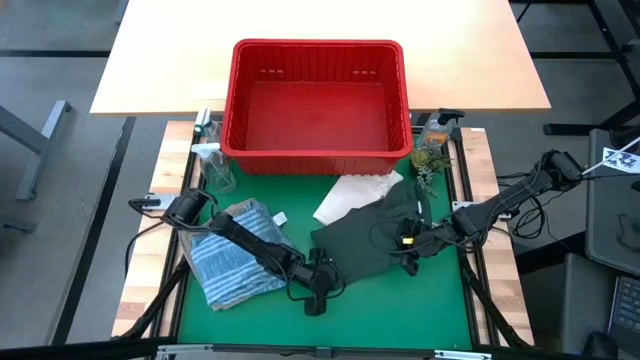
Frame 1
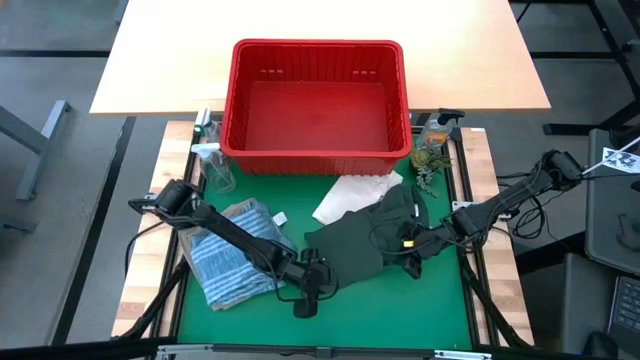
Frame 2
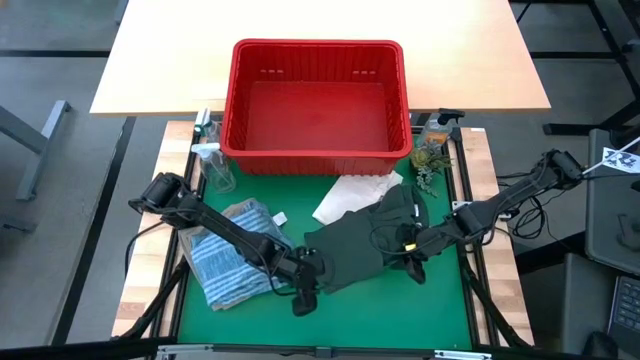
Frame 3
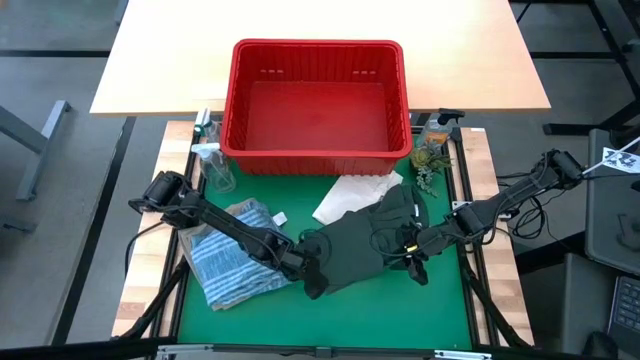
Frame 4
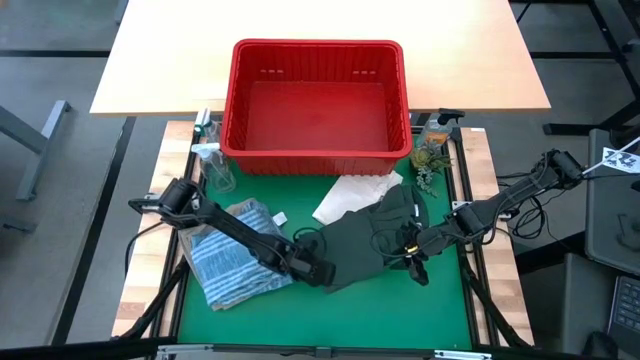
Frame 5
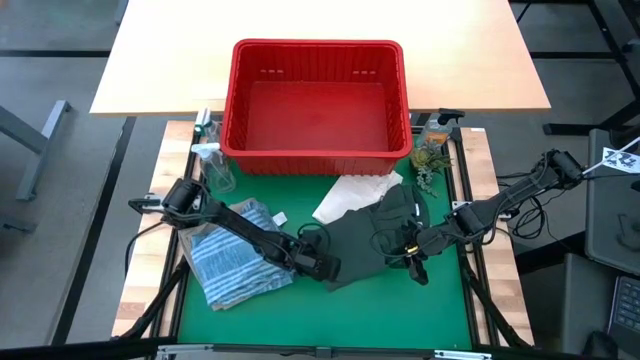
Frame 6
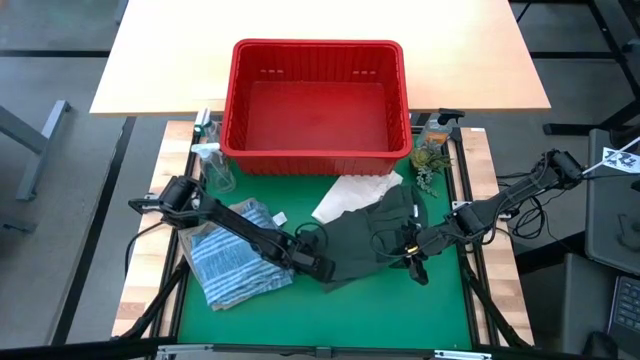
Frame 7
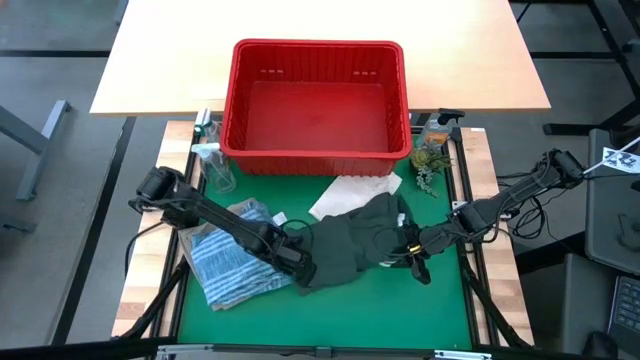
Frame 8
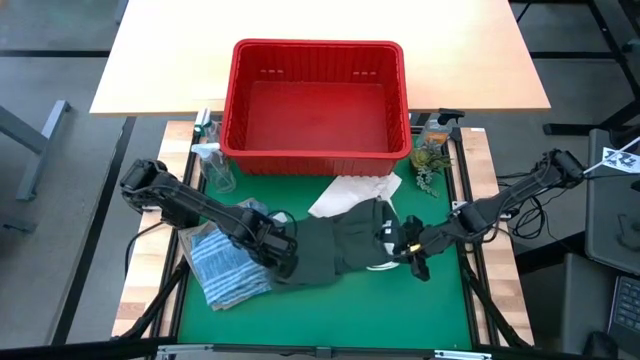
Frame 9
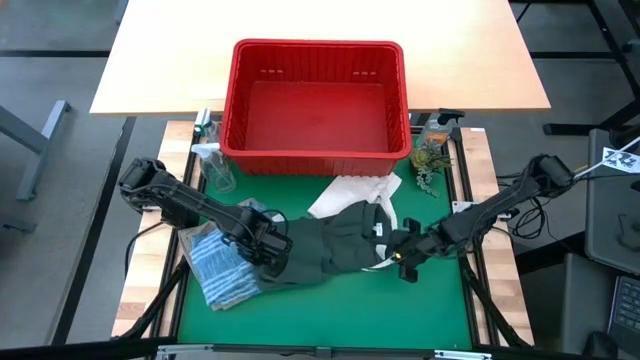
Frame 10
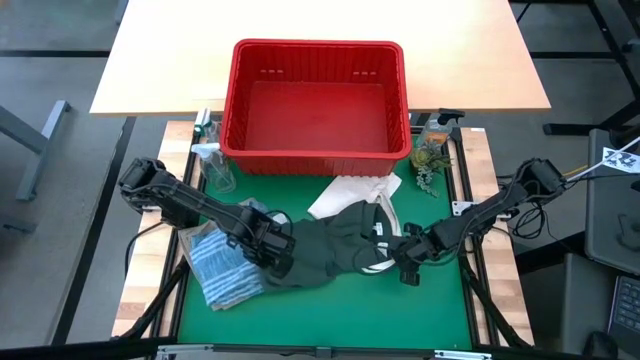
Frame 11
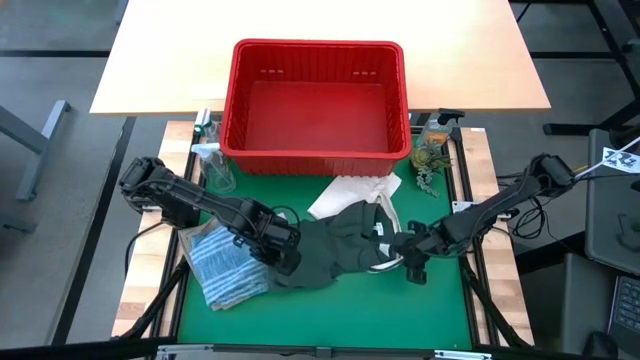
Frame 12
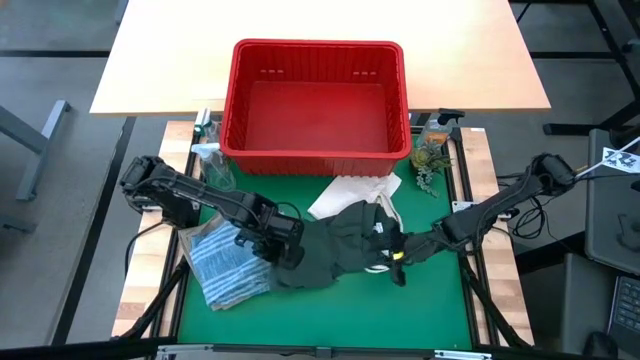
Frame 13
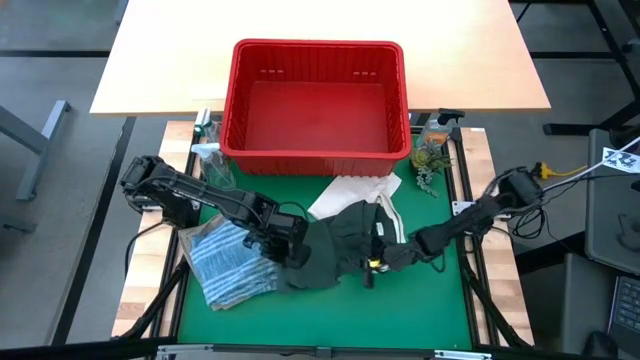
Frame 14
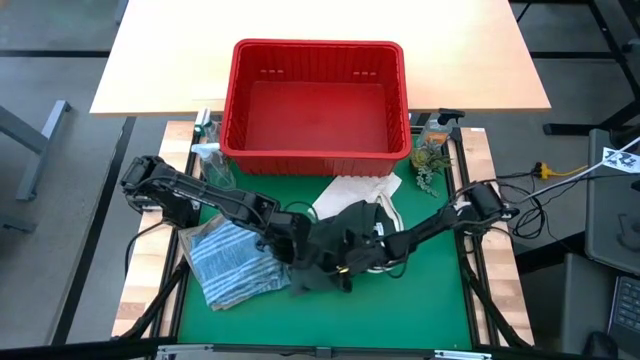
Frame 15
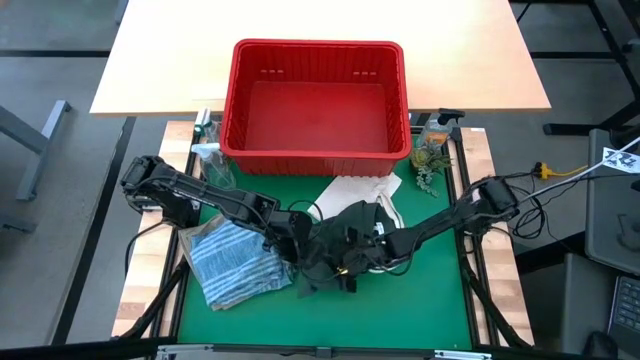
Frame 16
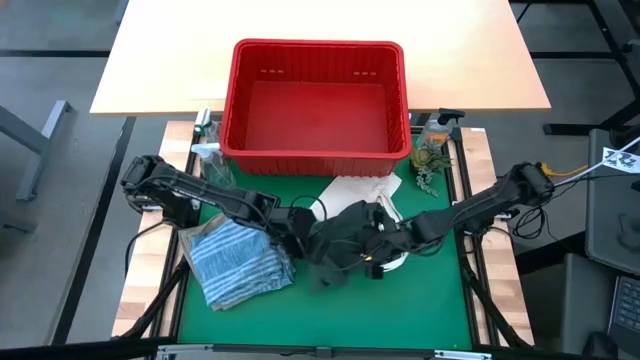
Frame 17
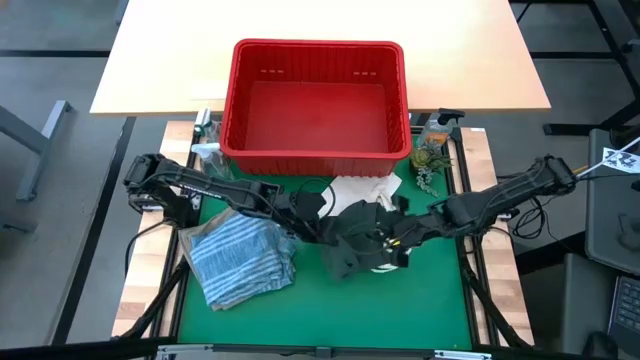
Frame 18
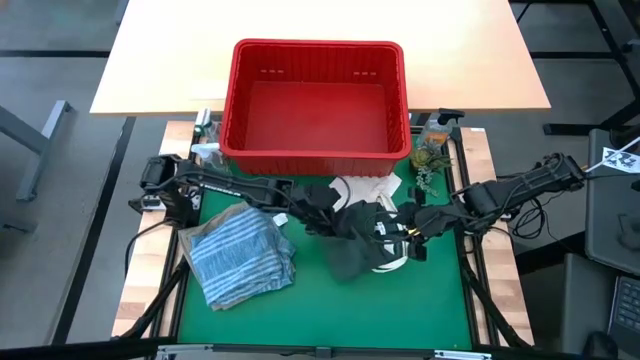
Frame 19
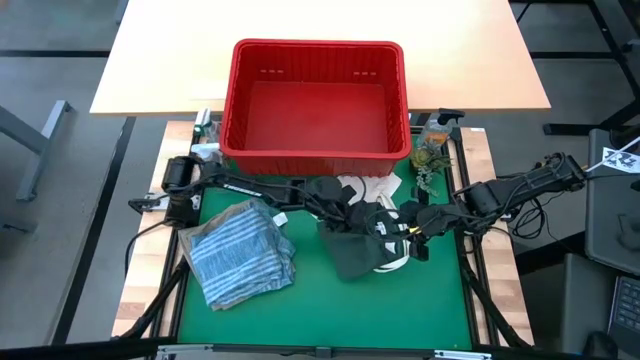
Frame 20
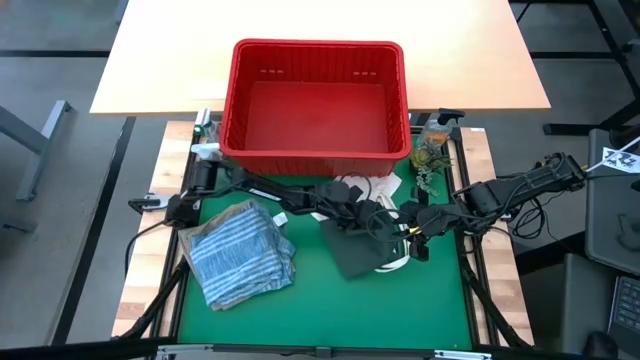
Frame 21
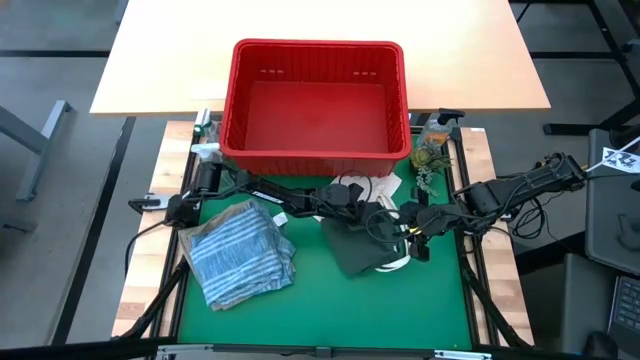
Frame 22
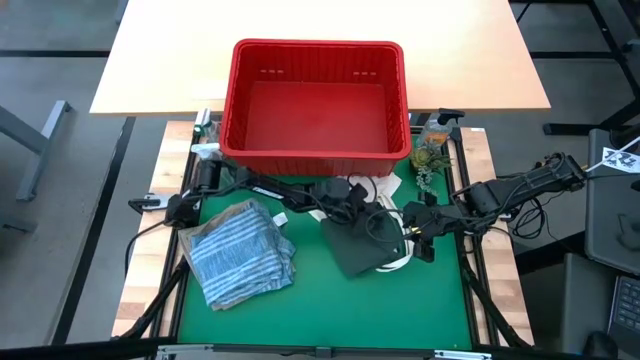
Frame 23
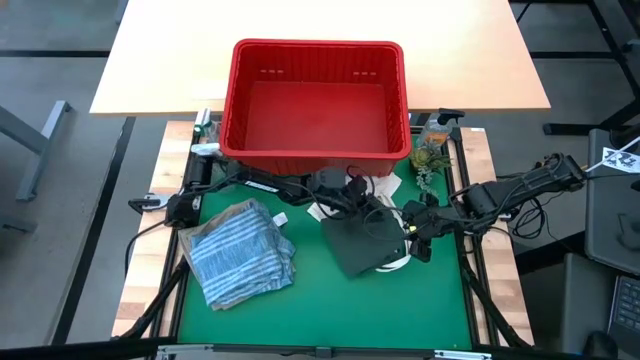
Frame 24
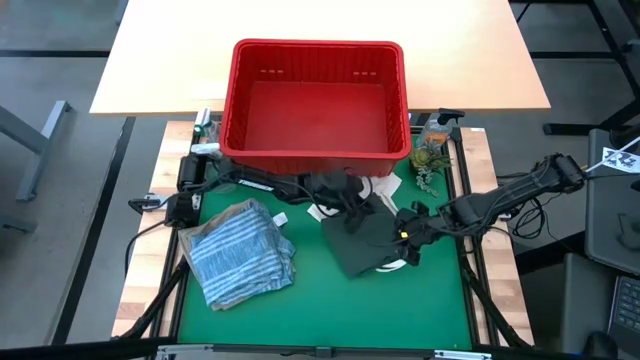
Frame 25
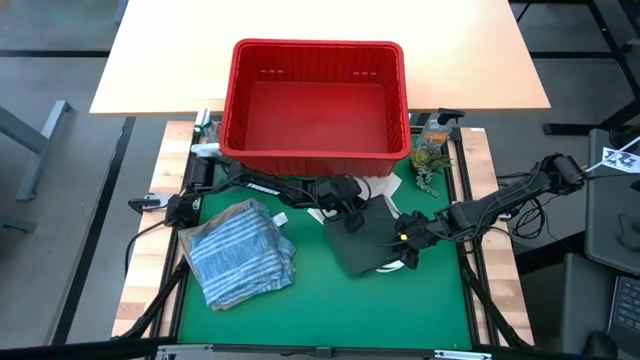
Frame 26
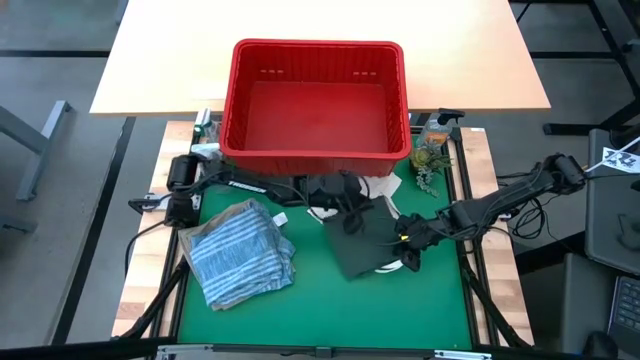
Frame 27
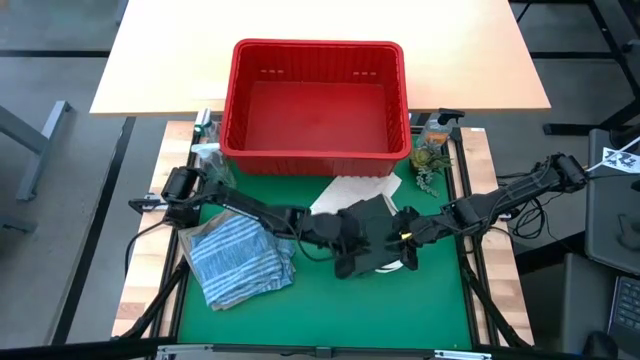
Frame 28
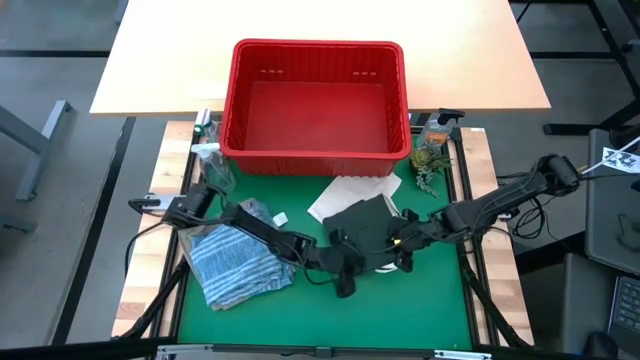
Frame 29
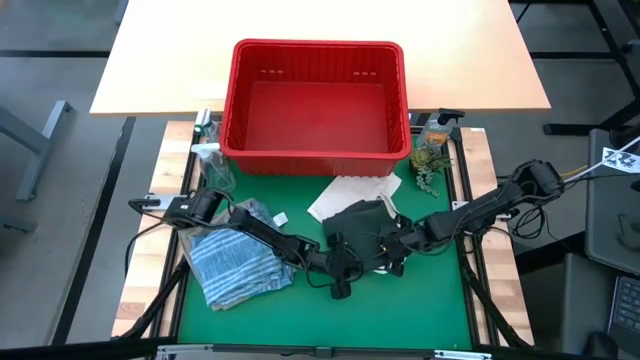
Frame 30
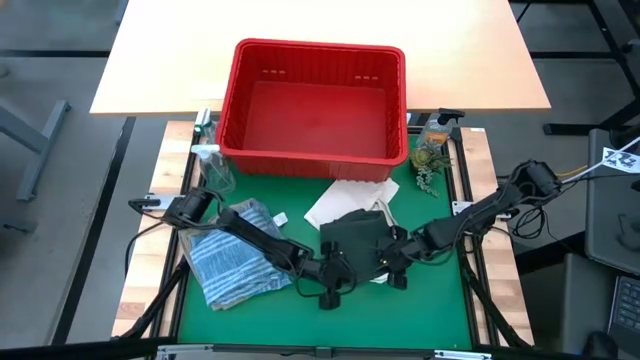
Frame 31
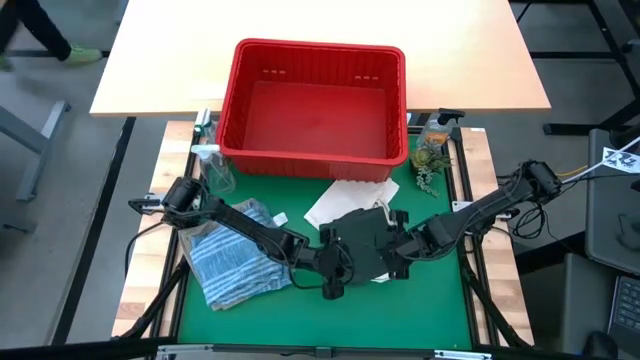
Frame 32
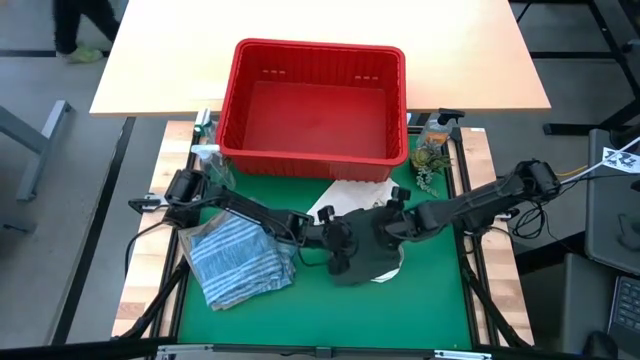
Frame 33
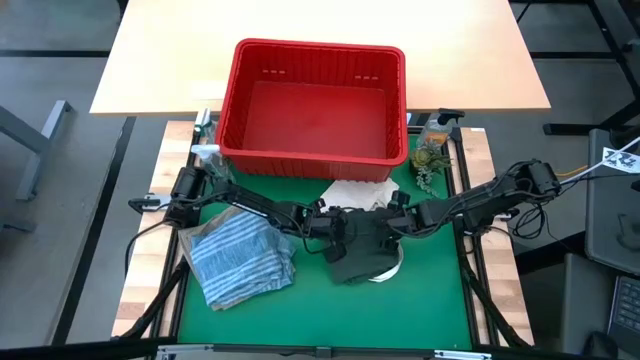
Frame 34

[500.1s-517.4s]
Task: Fold Laundry from Bin
Fold the green polo shirt
